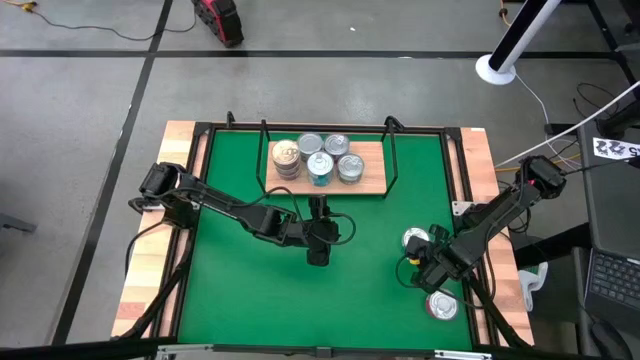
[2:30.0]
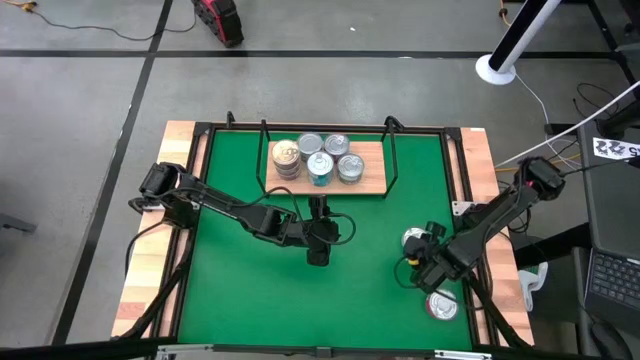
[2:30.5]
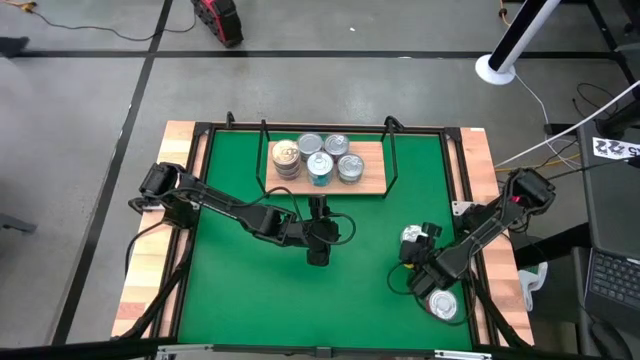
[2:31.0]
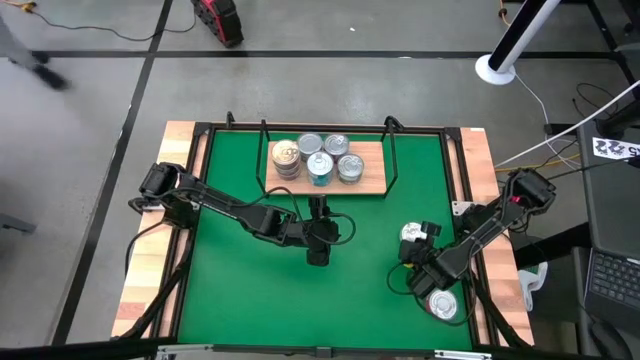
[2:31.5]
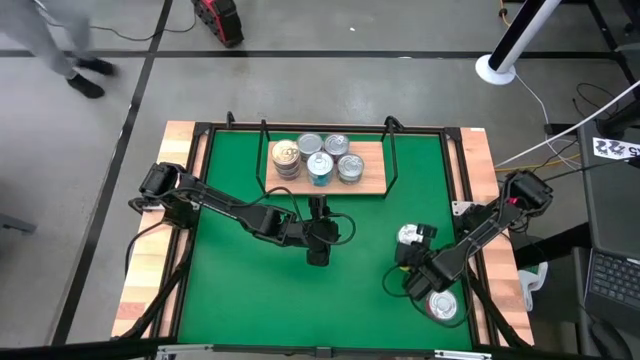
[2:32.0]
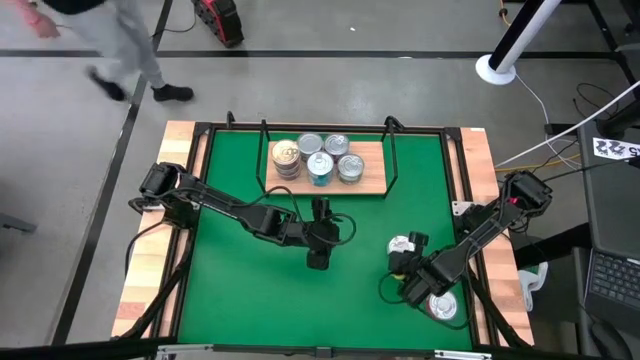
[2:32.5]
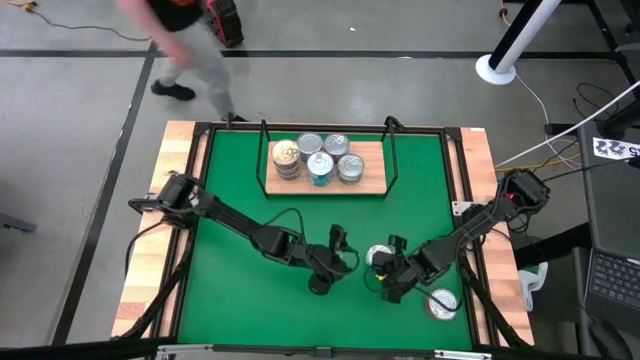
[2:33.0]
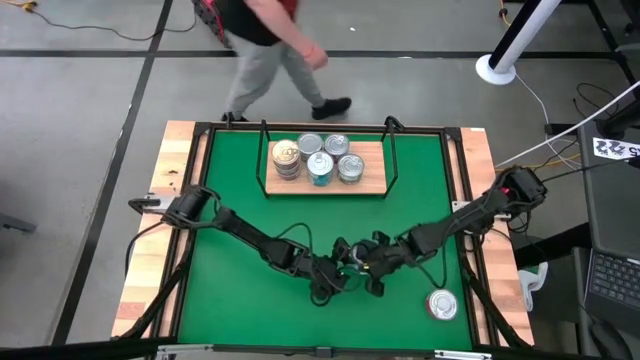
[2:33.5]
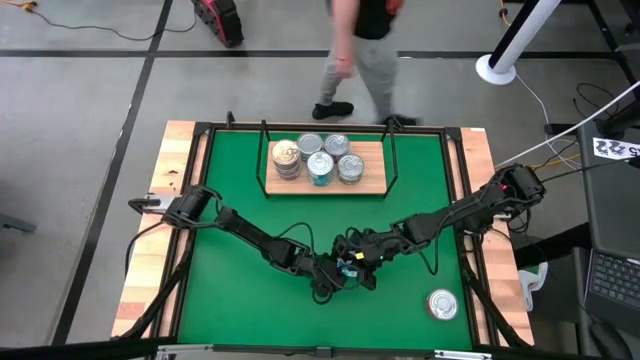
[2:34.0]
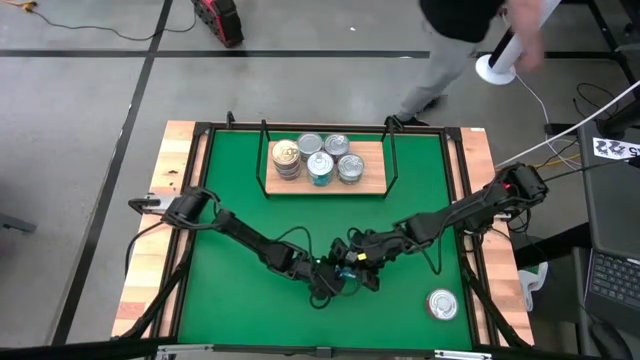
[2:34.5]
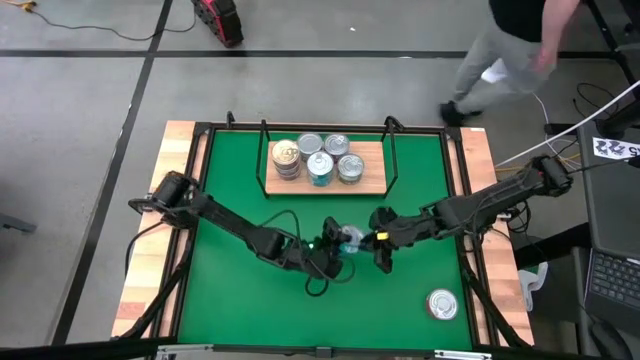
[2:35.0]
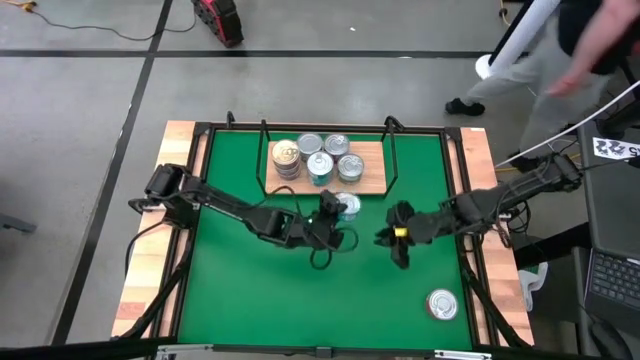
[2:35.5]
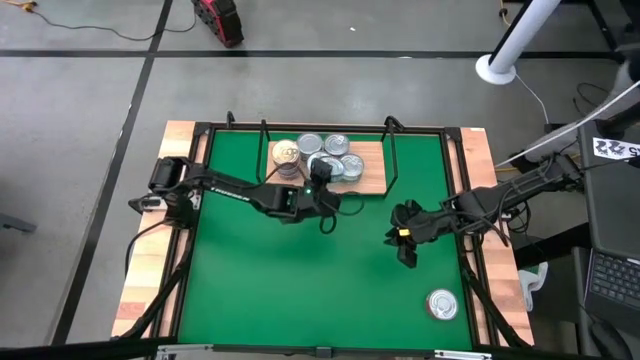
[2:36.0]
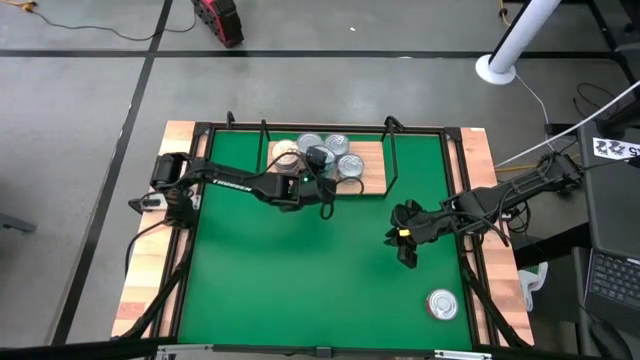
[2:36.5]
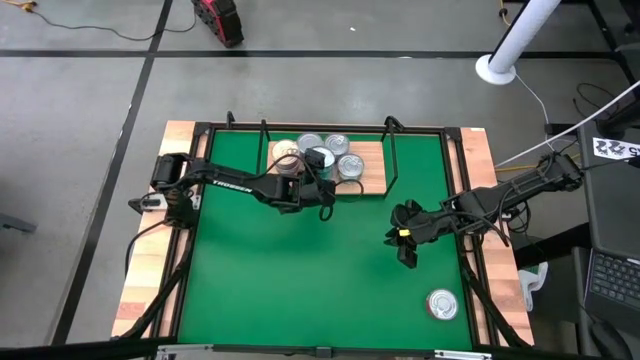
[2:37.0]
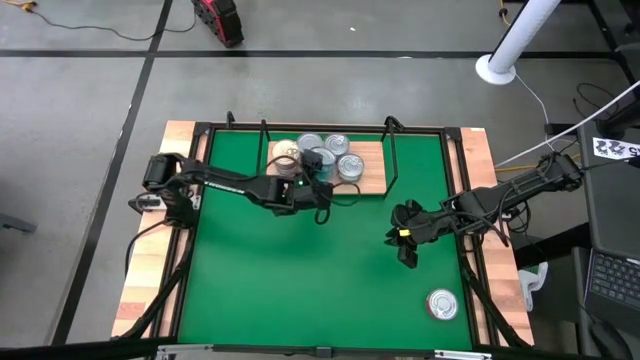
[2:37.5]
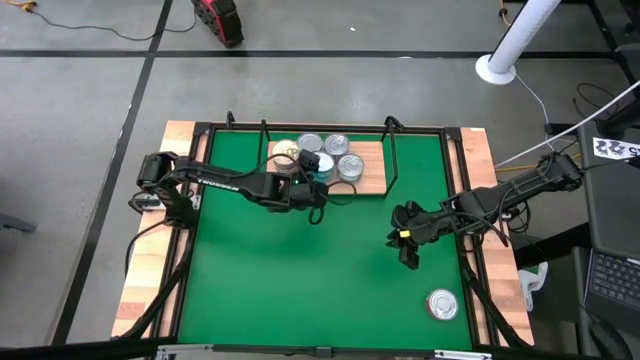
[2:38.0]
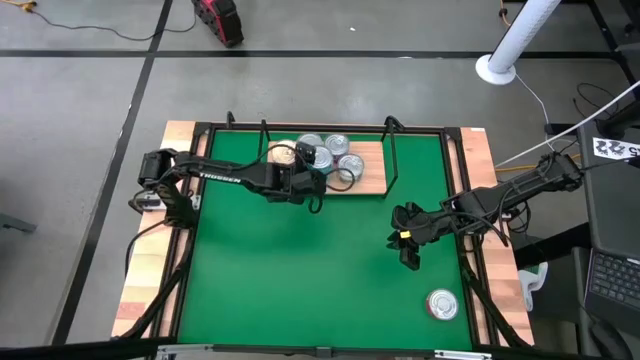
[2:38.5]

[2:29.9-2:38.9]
Task: Stack canned seafood by type on shelf
Stack the yellow blue tuna can on top of the other yellow blue tuna cans on the shelf

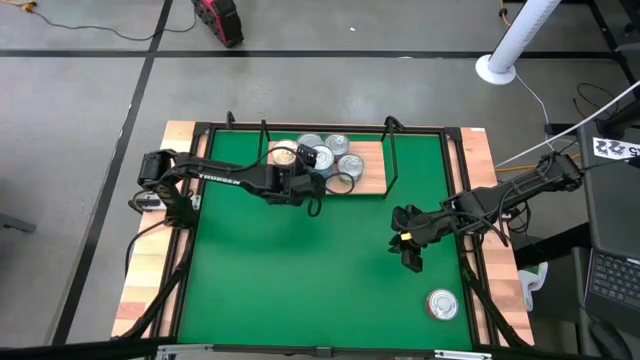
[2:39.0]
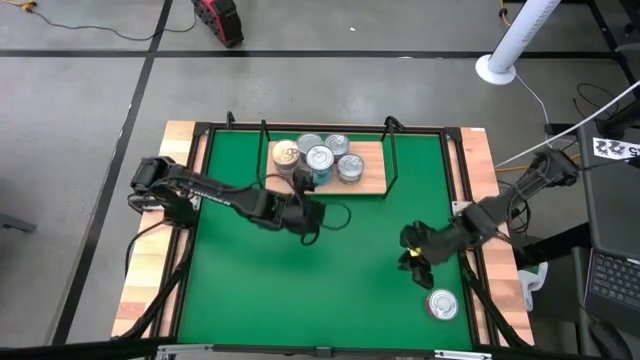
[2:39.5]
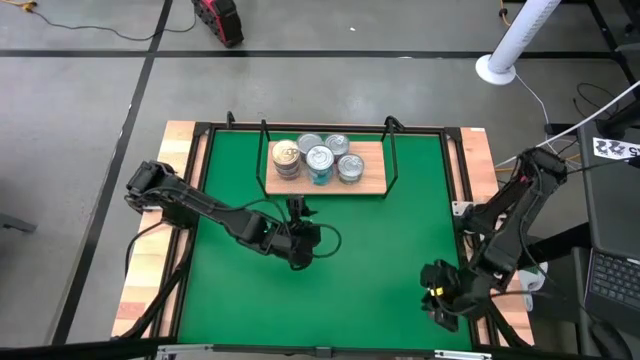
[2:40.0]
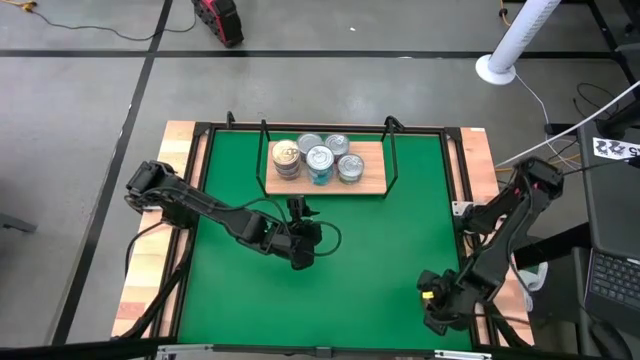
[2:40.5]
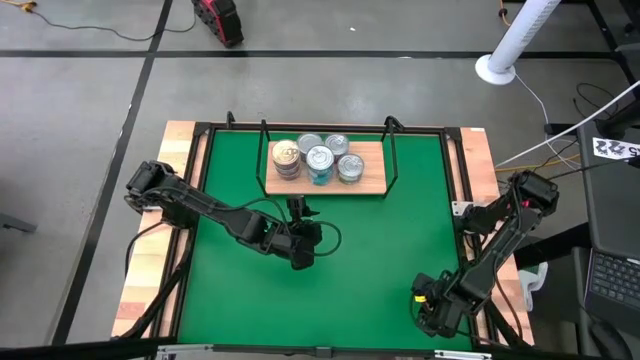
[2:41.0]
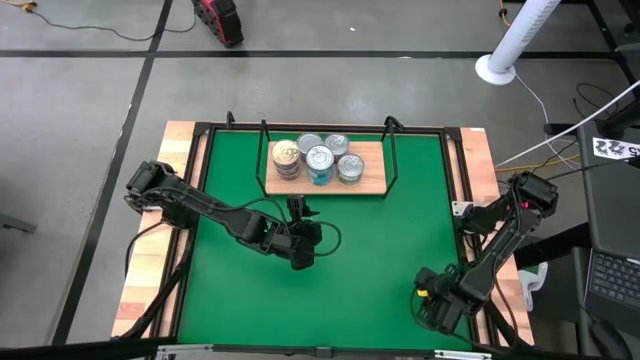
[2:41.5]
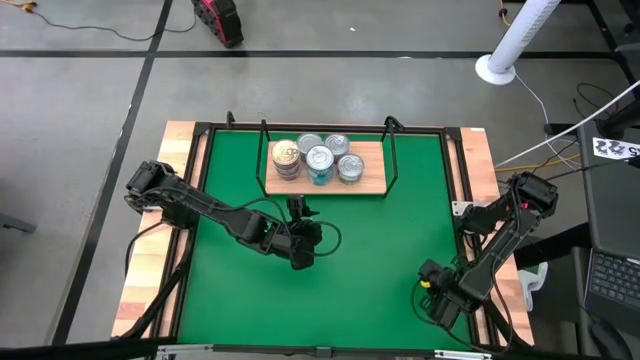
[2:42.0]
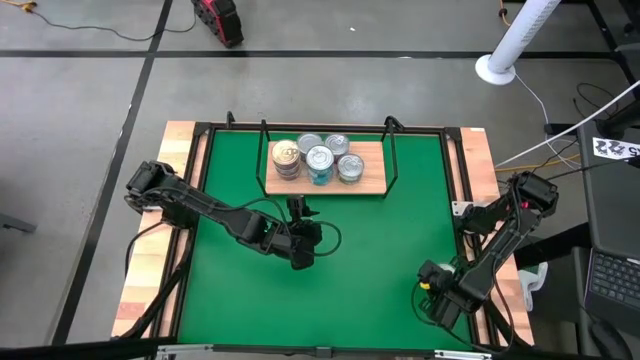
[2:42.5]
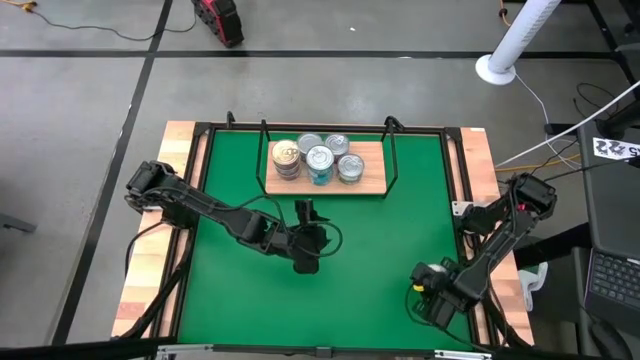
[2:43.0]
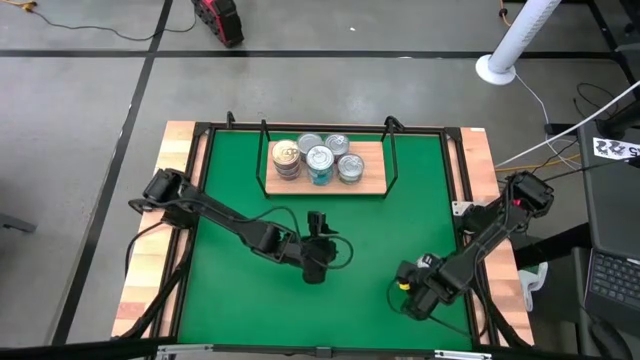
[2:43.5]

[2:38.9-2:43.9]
Stack the red tuna can on top of the other red tuna cans on the shelf

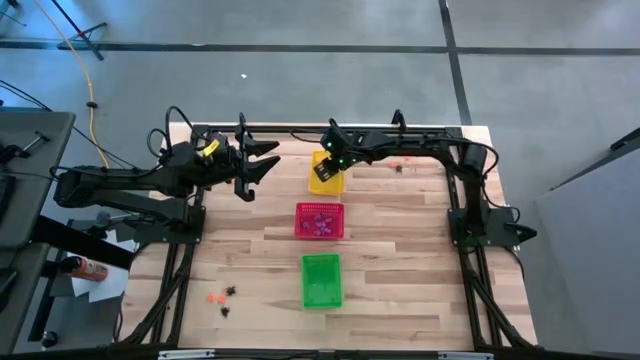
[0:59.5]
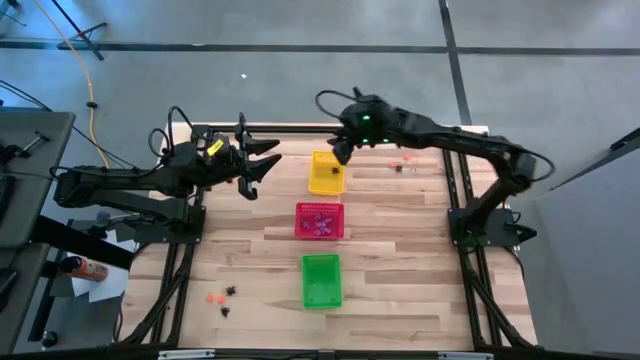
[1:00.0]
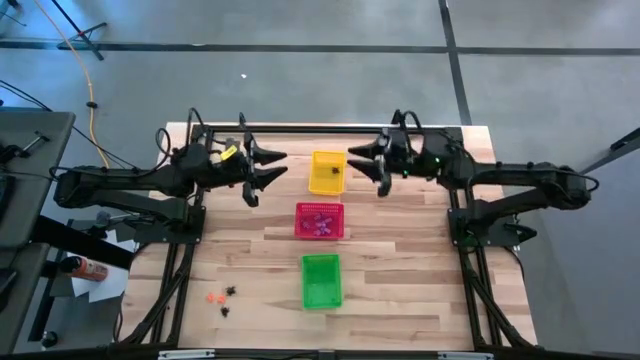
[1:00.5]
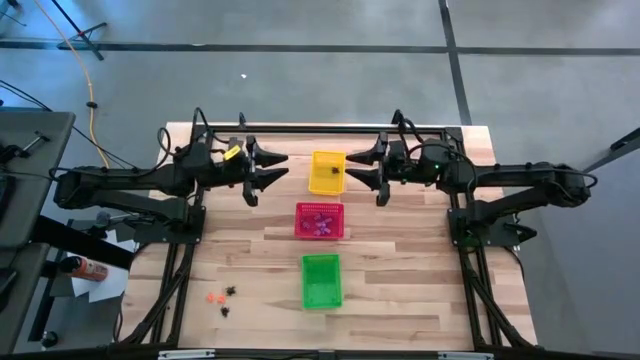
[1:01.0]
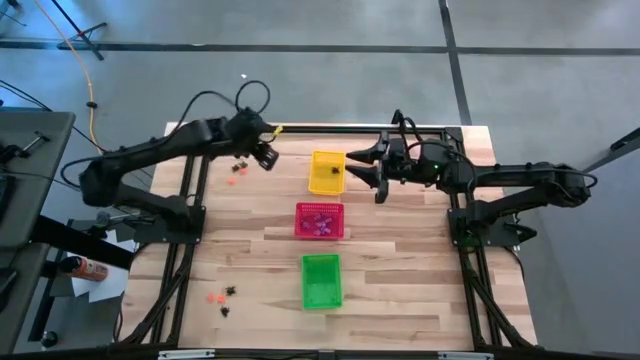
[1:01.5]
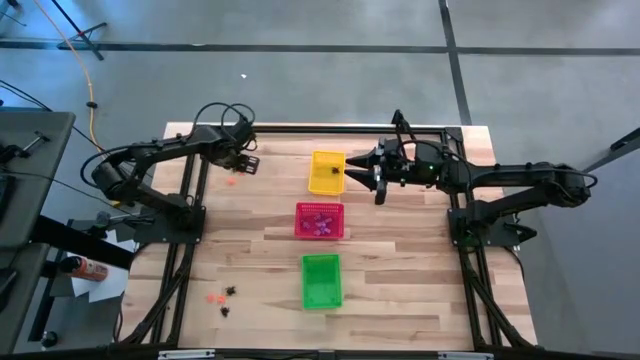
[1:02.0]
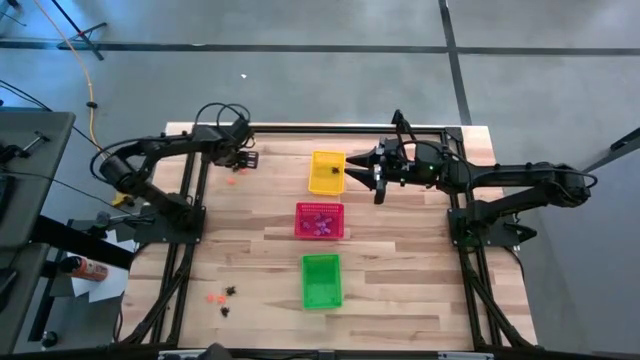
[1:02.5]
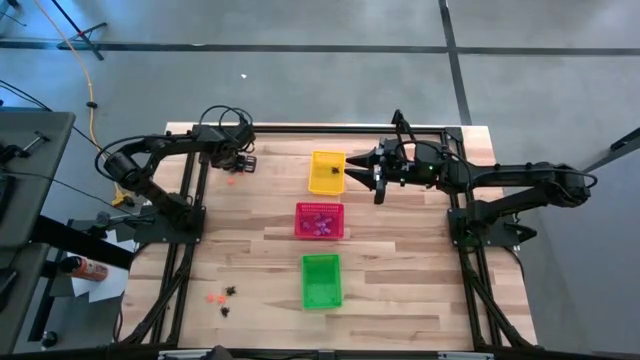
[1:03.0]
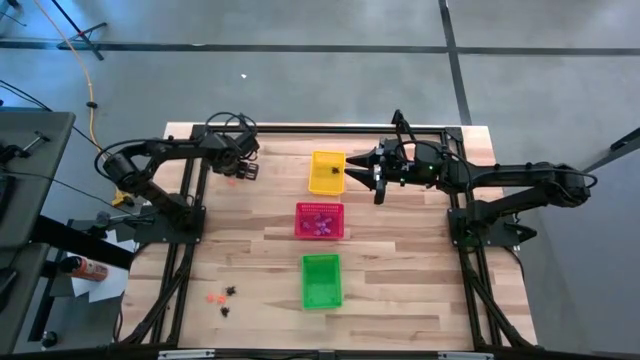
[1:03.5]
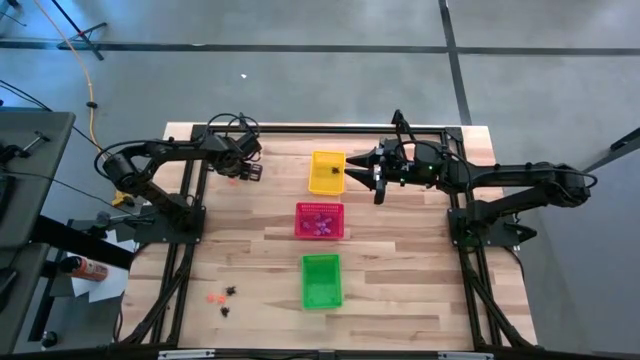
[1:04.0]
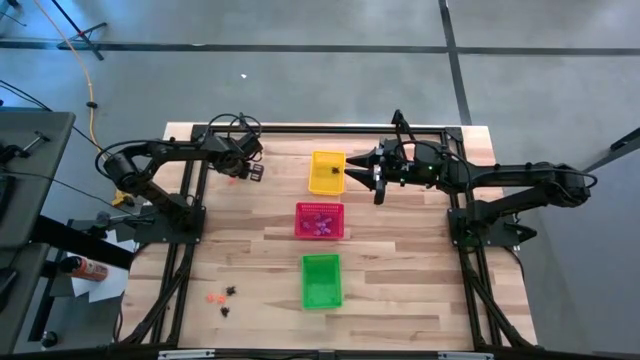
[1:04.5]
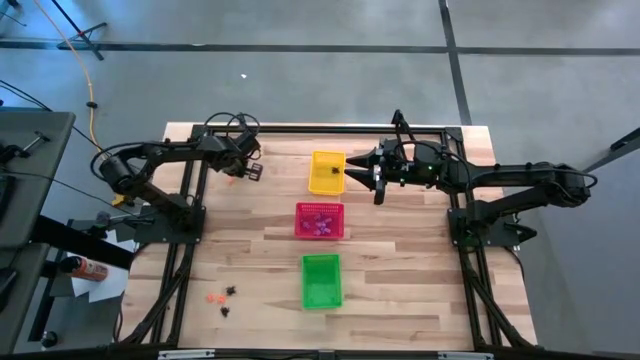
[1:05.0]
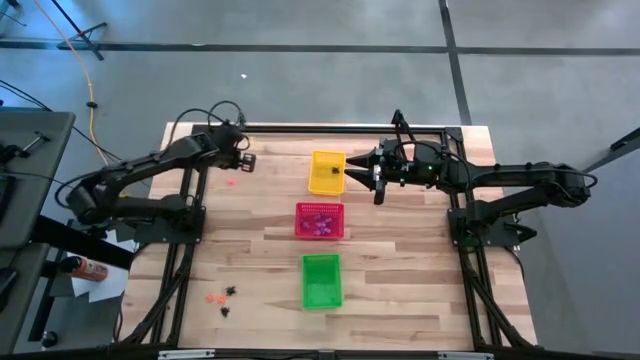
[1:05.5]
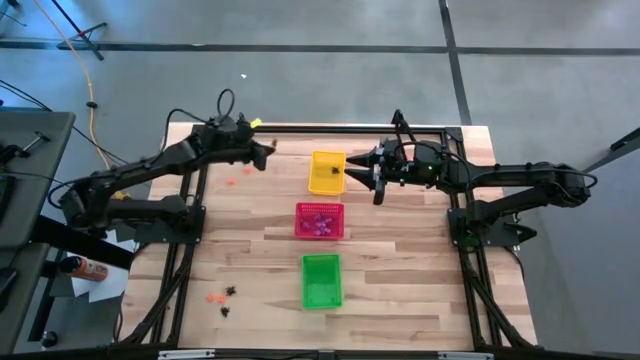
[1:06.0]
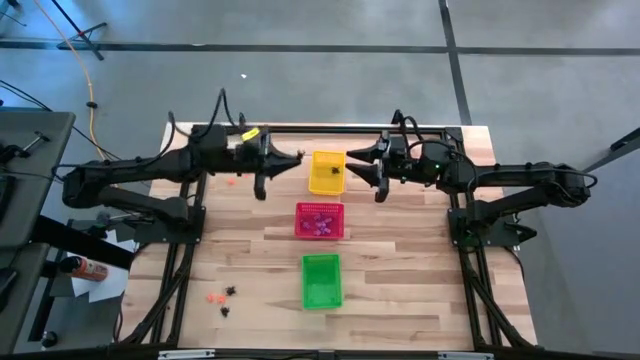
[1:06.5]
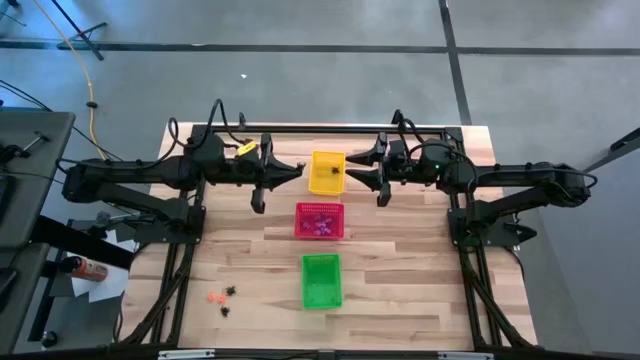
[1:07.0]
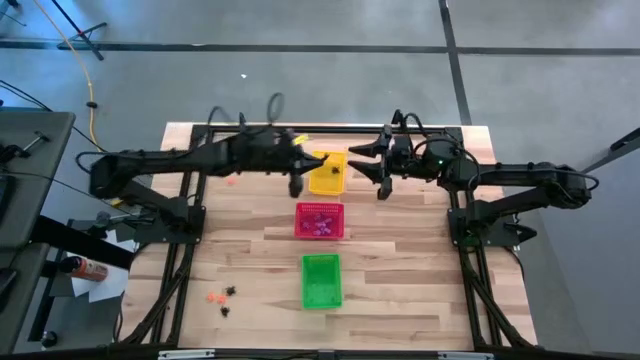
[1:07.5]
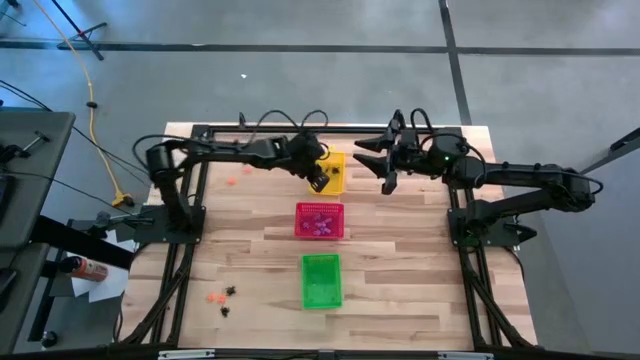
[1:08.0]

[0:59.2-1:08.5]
Task: Sort Halloween decoration
Put the black spider toy into the yellow bin
